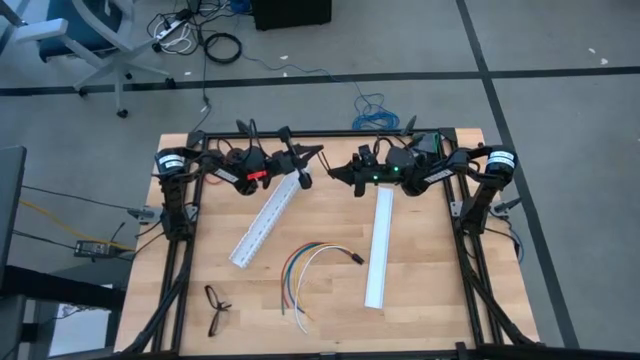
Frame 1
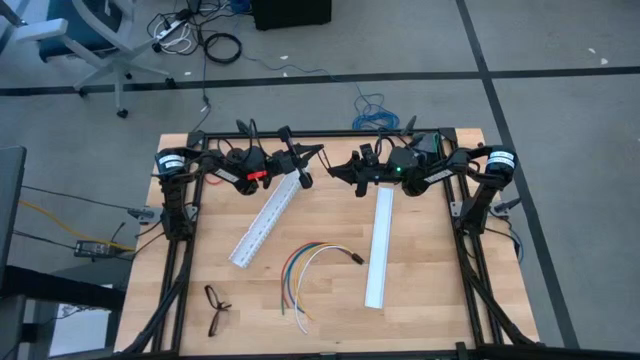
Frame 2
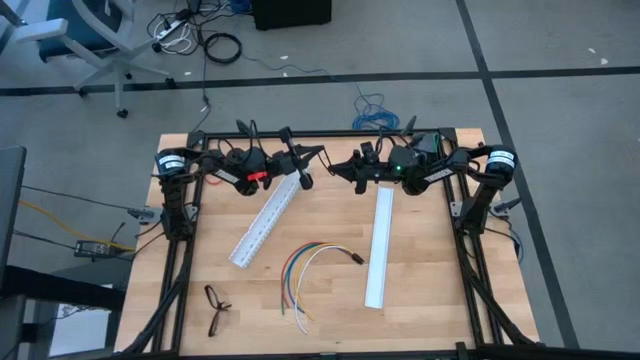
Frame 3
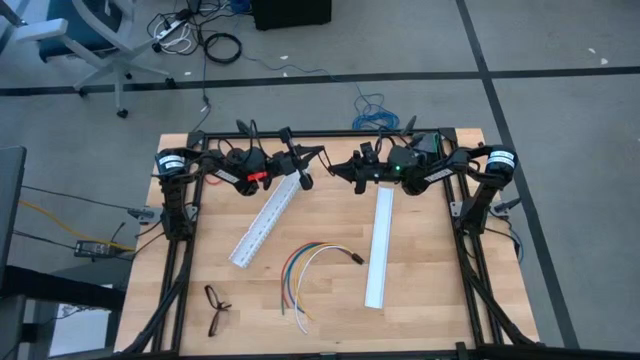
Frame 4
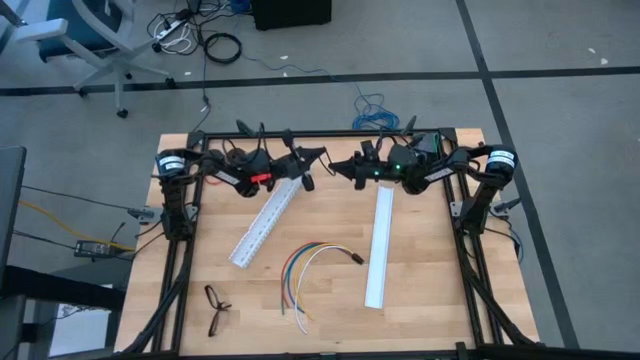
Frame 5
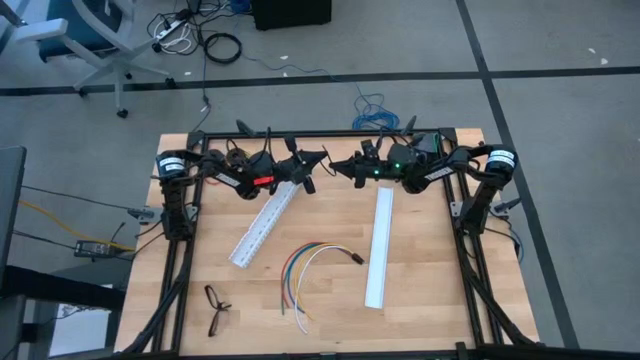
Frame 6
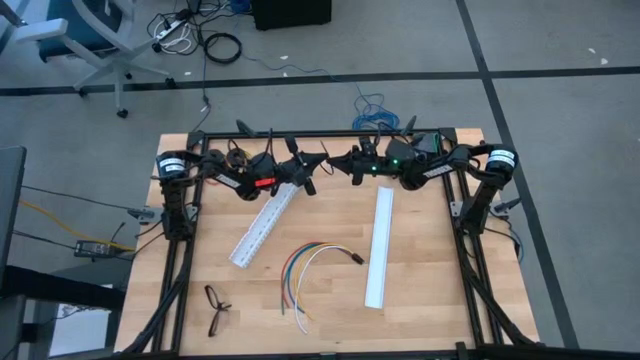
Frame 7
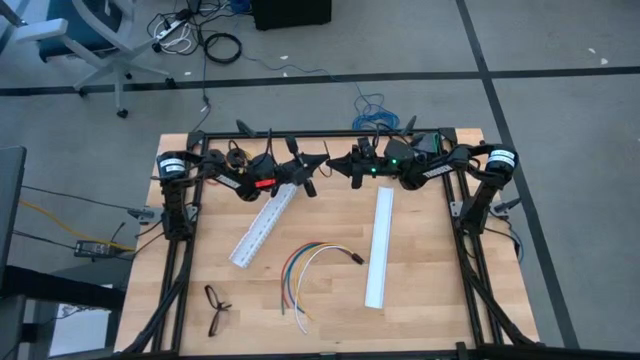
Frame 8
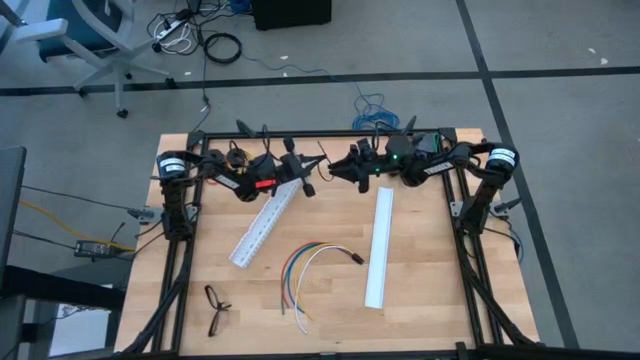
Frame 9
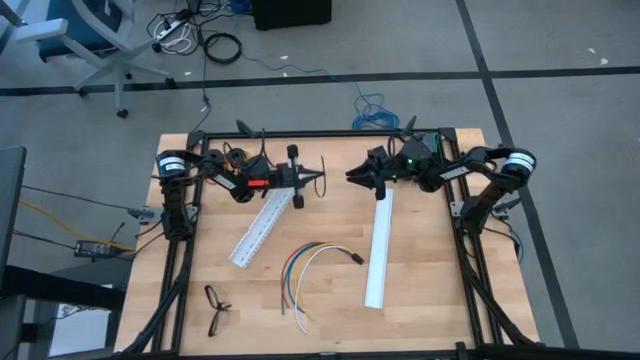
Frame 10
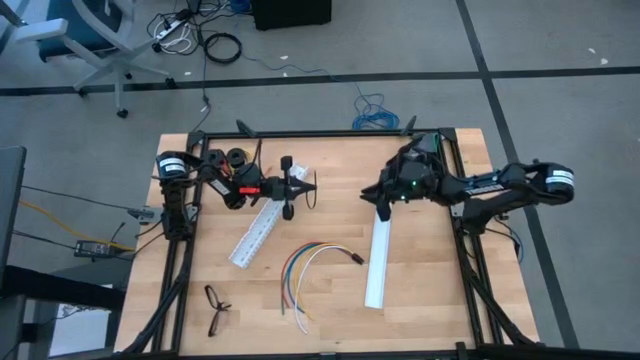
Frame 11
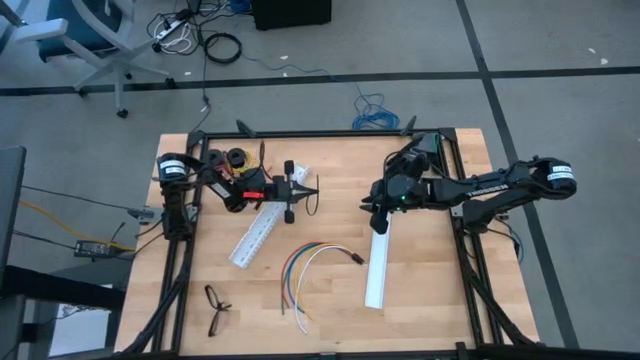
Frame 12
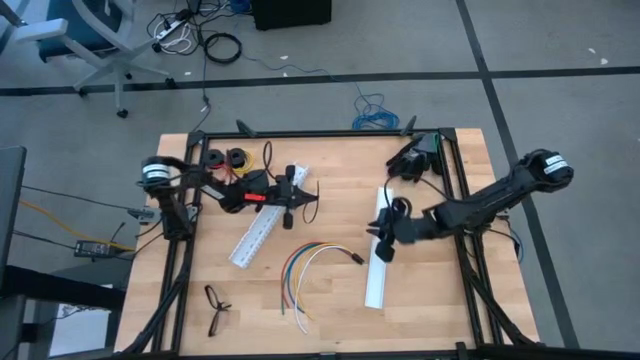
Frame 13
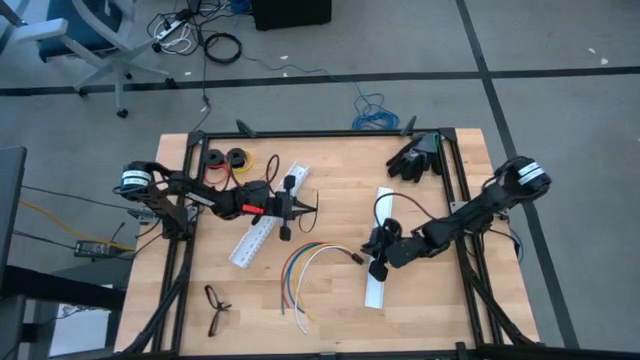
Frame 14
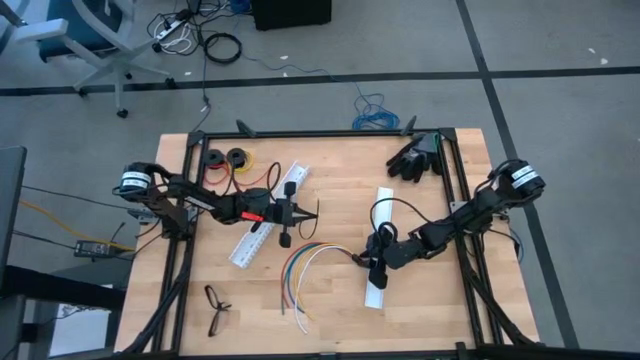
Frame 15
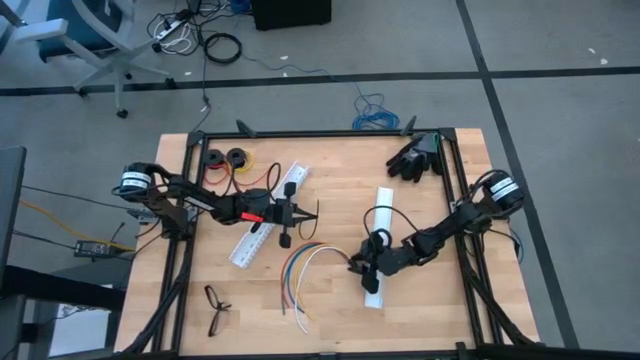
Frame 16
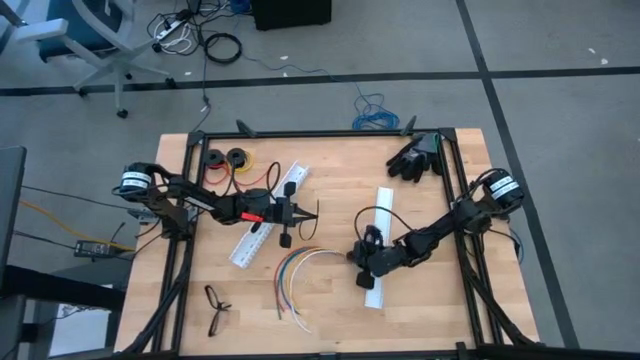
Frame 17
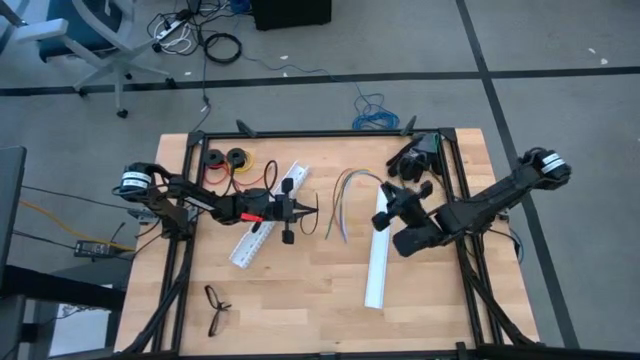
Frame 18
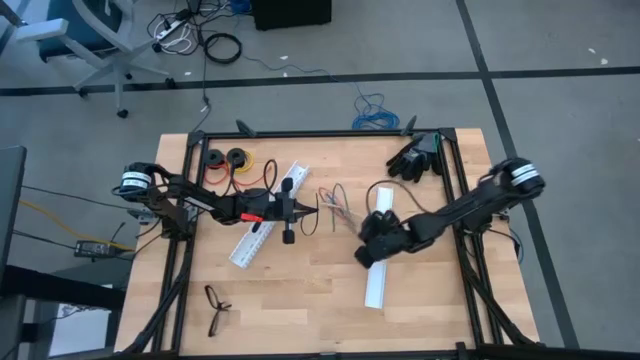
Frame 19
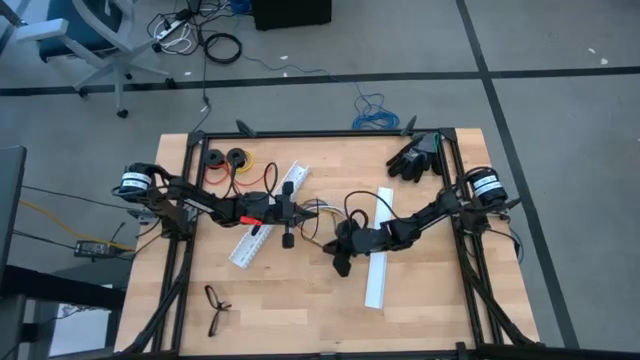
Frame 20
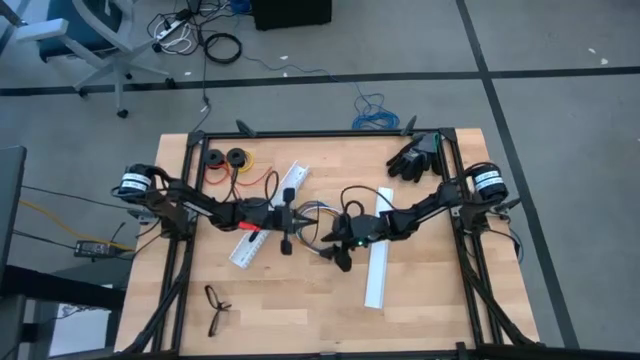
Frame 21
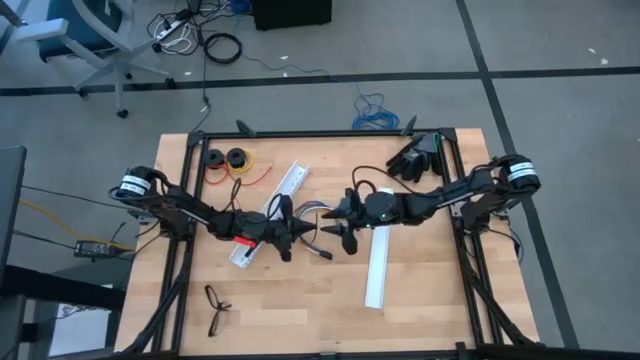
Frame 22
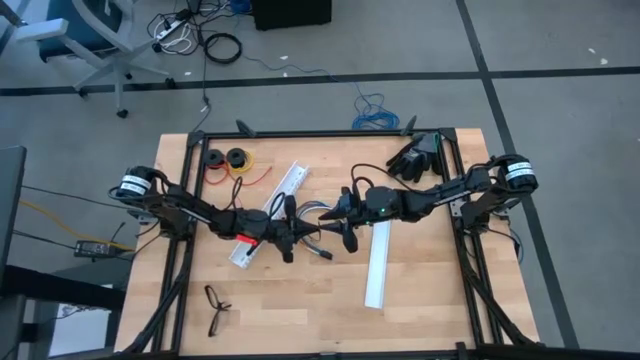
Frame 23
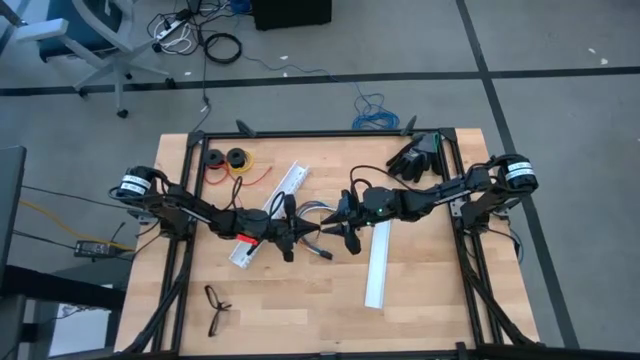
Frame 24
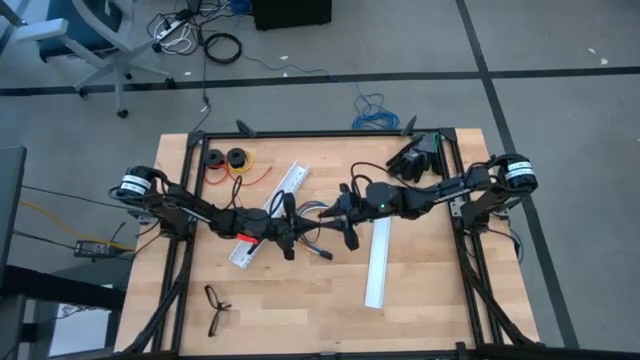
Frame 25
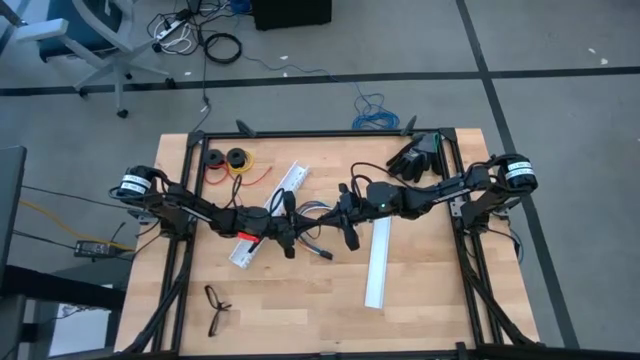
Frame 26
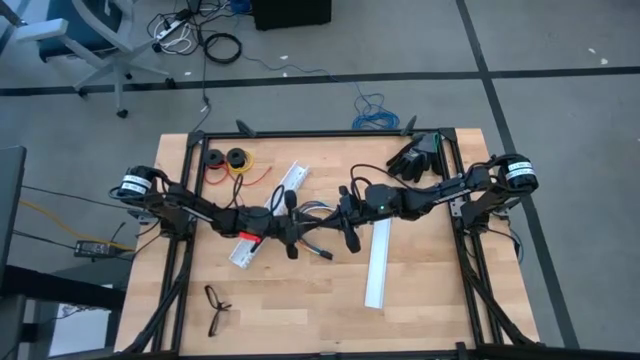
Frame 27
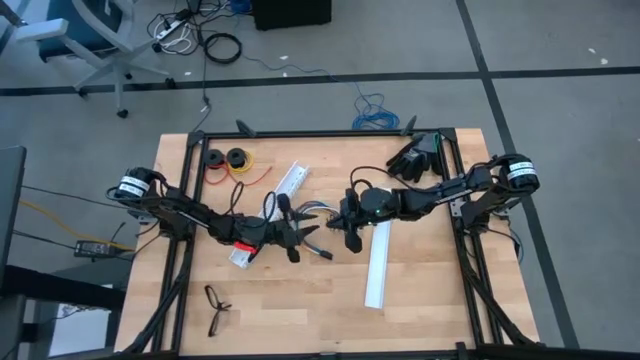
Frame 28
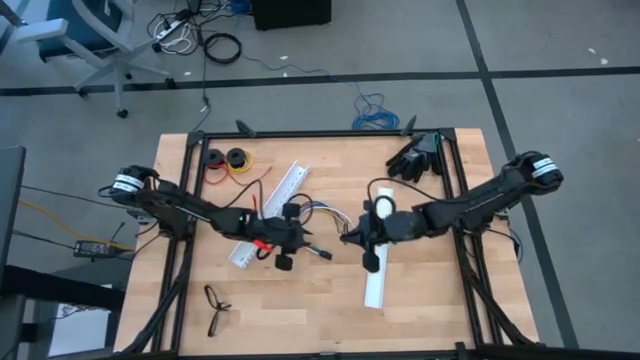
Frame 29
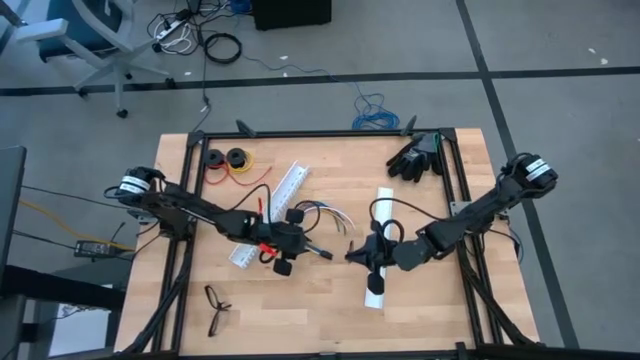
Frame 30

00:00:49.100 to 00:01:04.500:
Task: Ziptie cables
Wrap the cable wires together using the black zip tie
